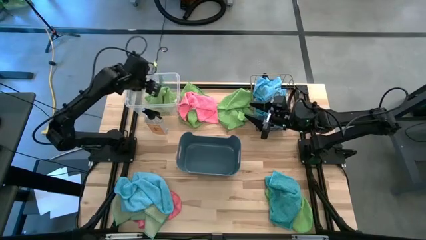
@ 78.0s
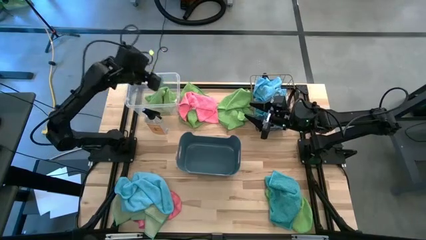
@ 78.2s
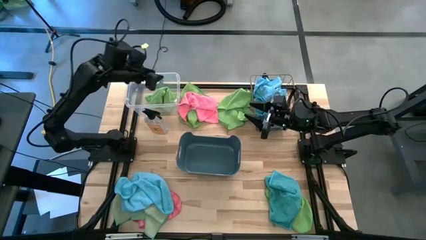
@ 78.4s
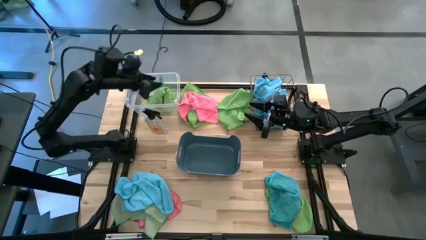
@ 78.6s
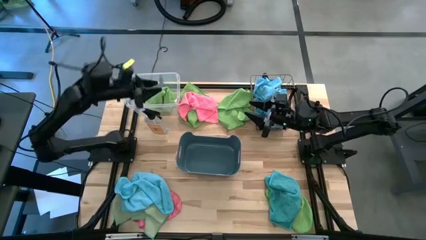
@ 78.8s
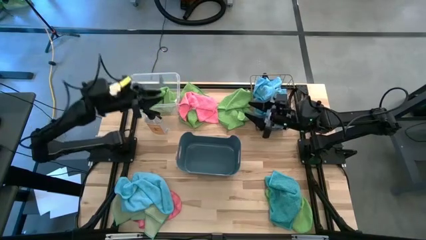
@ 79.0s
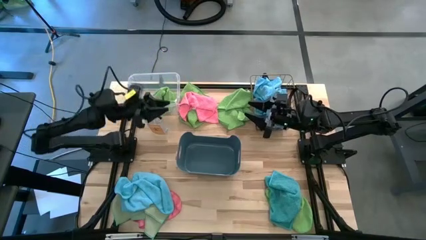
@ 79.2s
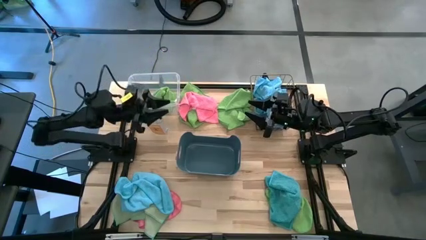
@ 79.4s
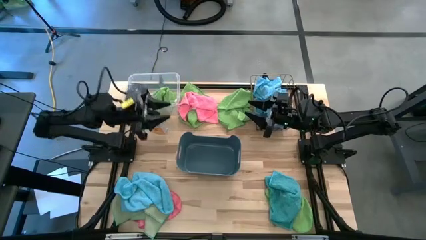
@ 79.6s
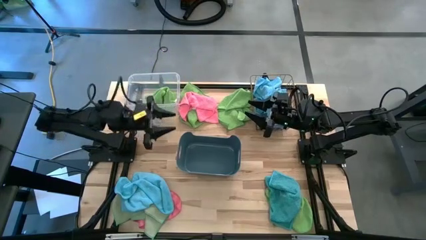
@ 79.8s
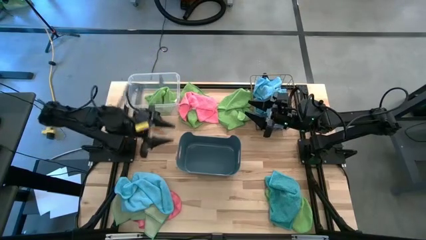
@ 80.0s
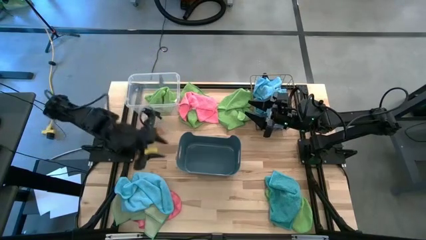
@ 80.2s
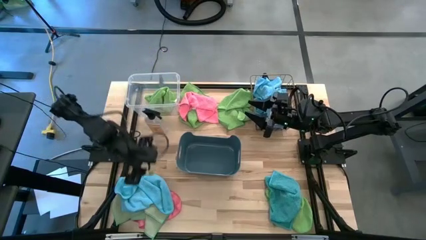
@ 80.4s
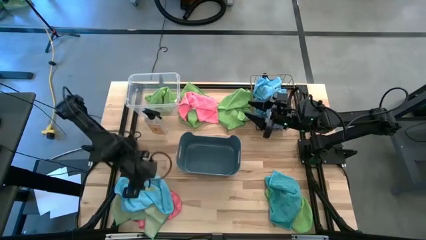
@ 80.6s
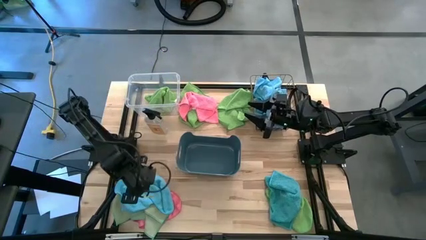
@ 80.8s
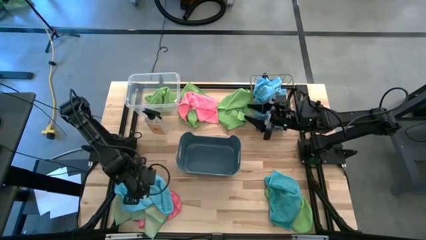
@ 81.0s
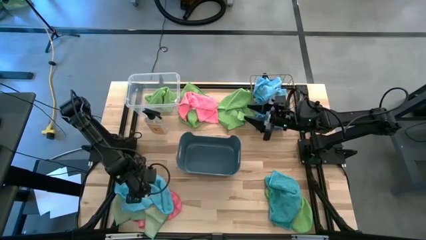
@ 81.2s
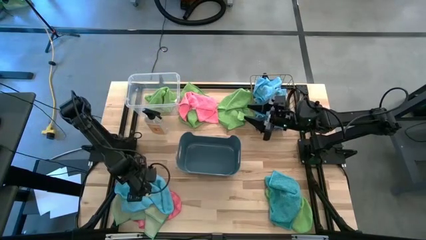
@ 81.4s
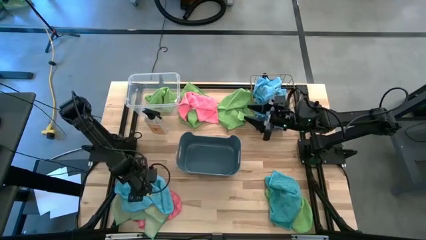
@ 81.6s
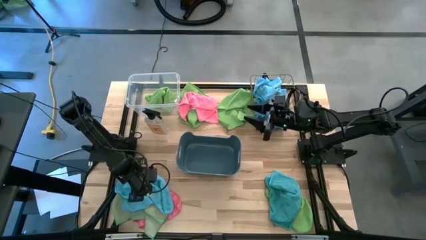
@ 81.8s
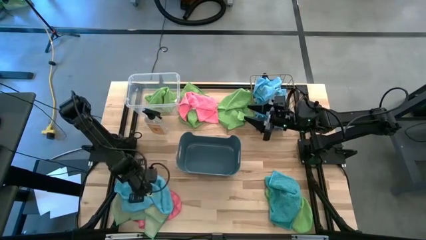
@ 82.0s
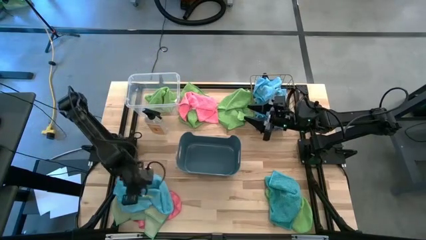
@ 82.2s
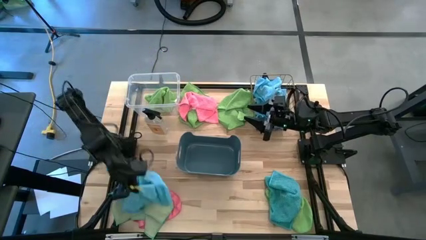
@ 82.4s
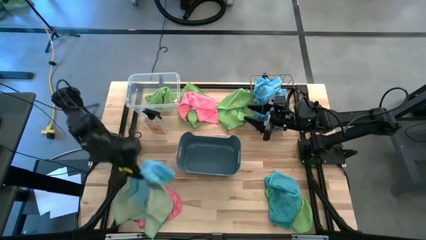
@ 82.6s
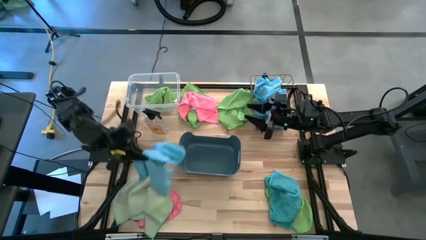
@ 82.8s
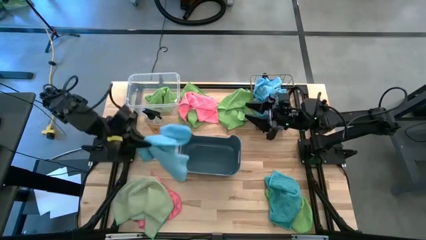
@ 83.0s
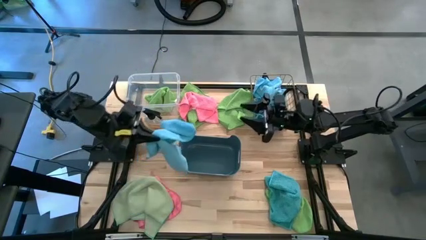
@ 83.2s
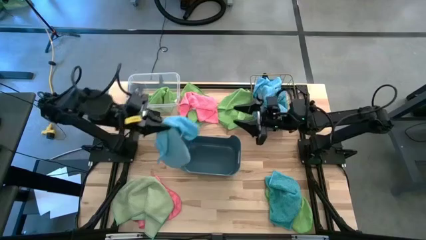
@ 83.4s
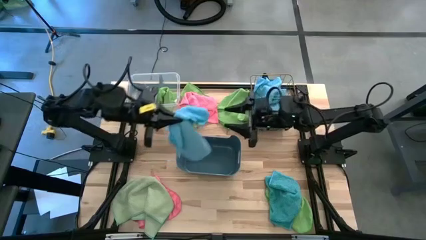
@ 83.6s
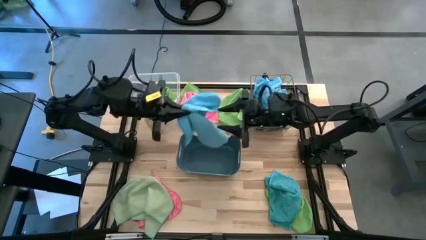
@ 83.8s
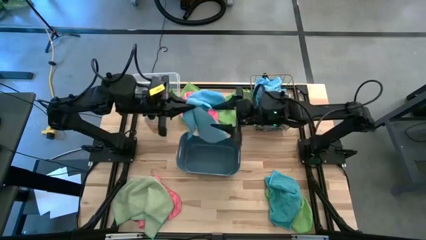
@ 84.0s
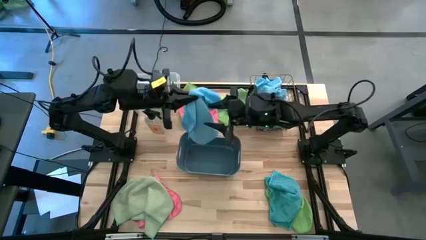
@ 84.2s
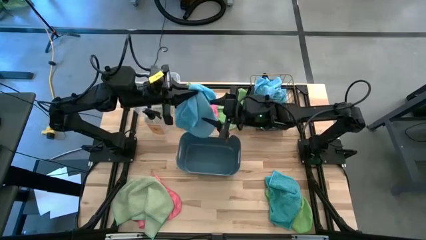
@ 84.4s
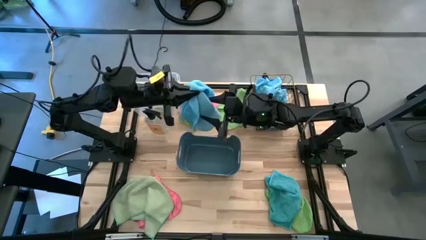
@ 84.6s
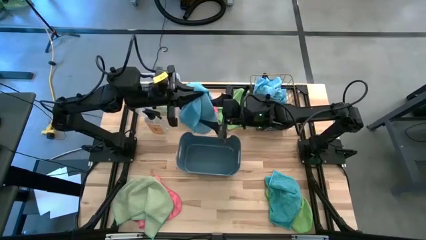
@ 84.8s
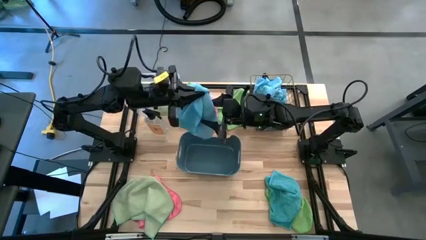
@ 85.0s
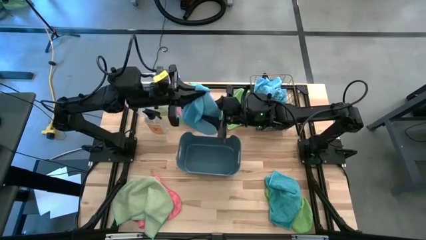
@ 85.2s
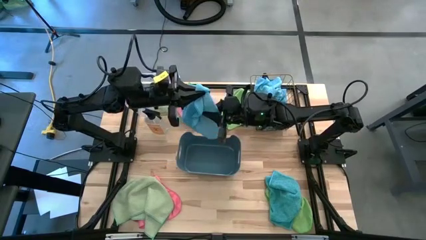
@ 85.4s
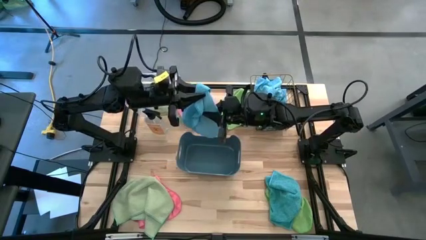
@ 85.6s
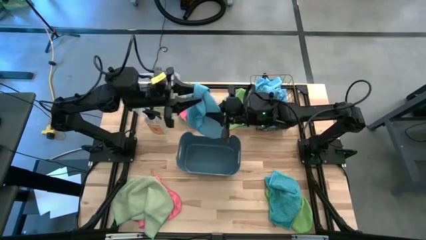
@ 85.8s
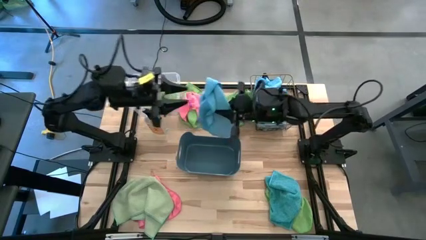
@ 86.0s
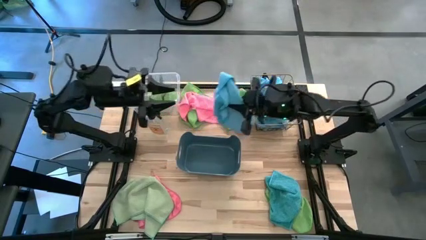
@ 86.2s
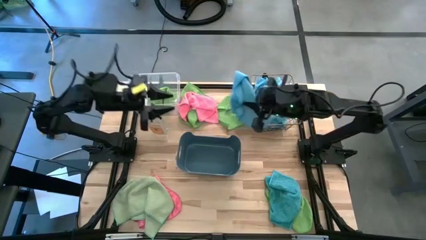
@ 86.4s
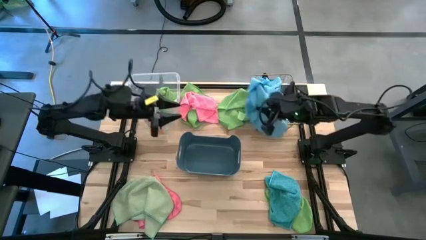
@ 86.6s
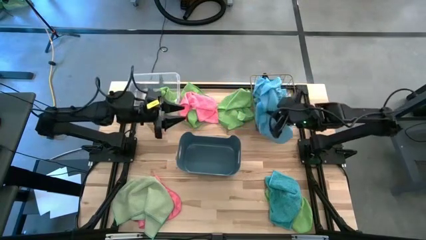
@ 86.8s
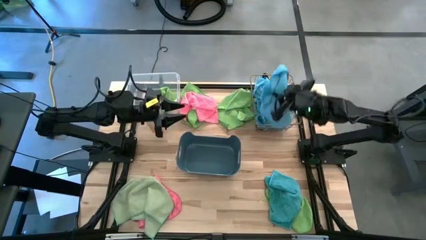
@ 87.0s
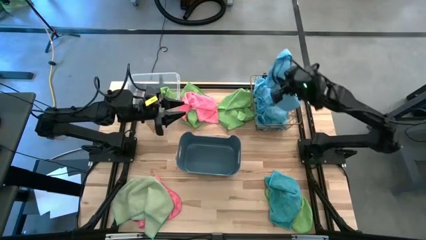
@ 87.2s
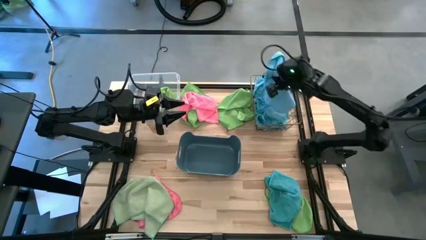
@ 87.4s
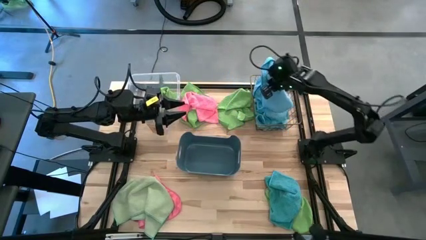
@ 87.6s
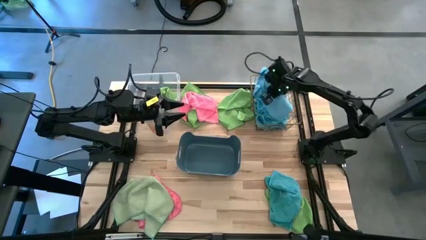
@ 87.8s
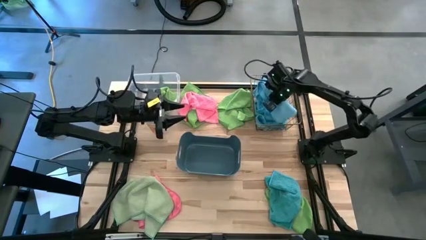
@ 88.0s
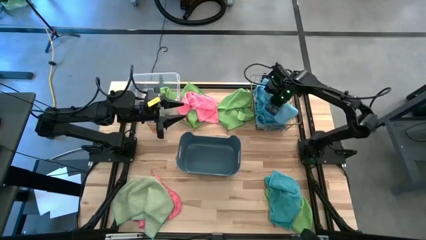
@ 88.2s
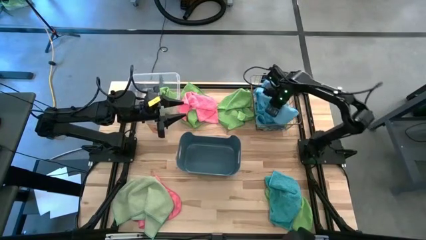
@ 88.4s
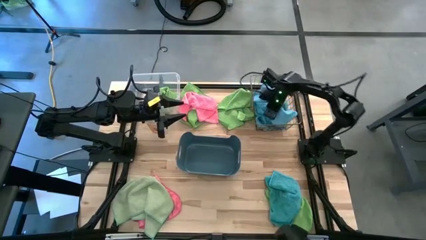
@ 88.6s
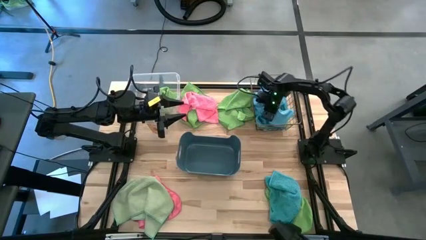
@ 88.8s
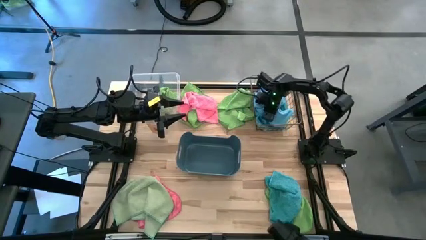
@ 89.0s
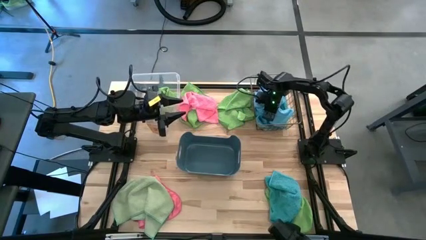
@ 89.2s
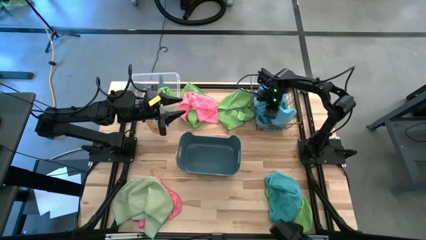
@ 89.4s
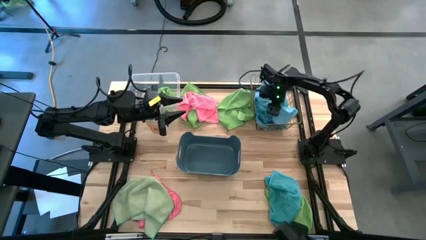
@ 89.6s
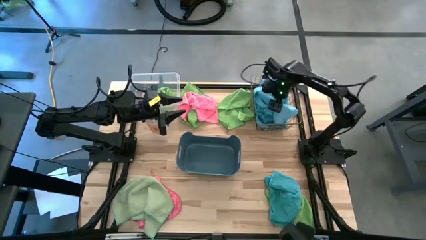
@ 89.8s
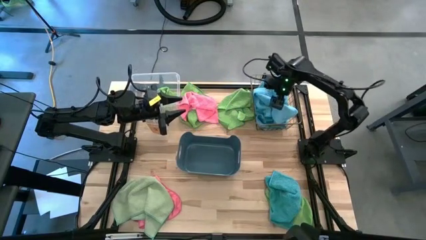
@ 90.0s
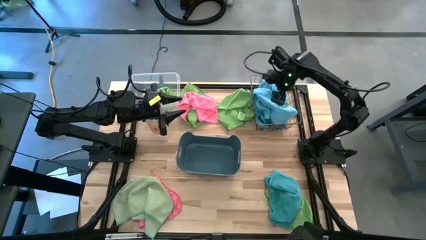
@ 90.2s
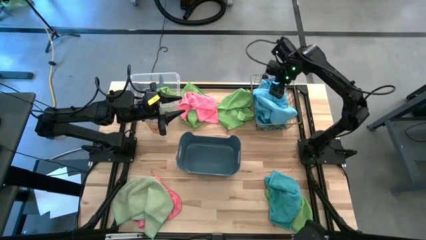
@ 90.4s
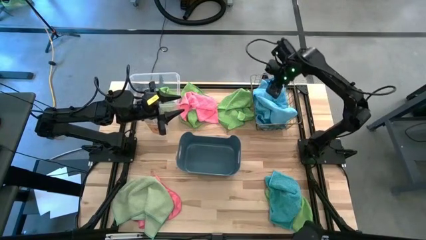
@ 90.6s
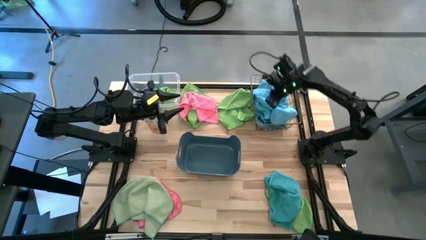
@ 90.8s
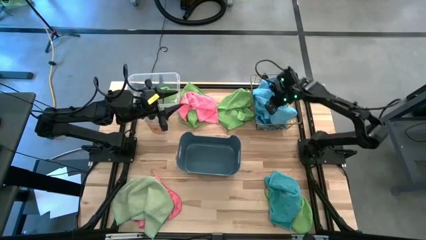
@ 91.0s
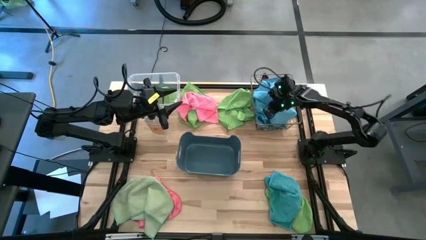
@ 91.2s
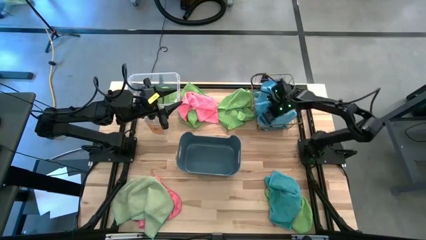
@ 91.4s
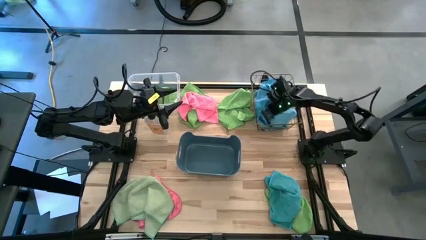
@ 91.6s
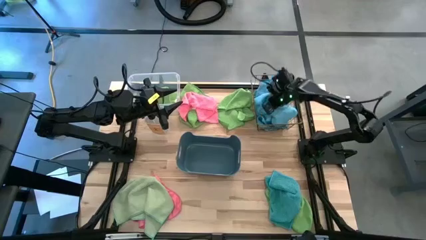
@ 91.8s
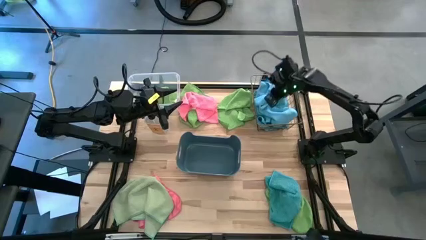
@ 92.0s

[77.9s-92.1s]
Task: Sort microfiber towel by color & place in baskets
Put the blue microfiber cloth into the gold wire basket
